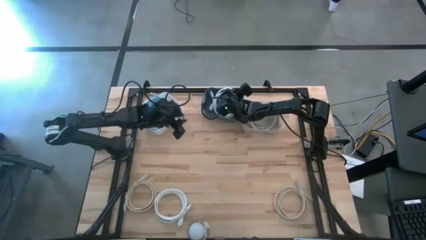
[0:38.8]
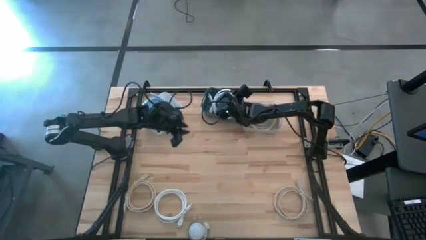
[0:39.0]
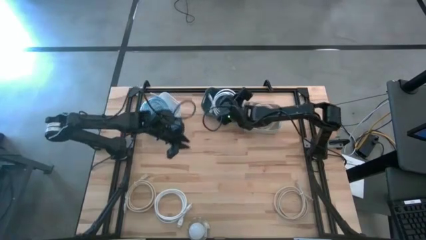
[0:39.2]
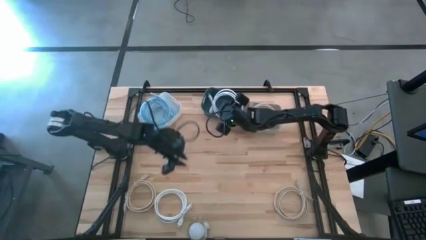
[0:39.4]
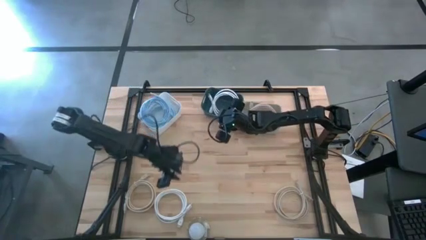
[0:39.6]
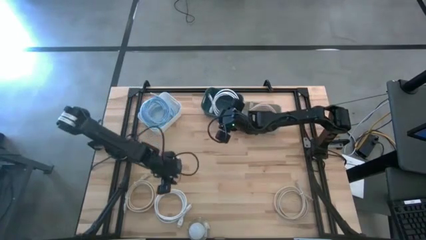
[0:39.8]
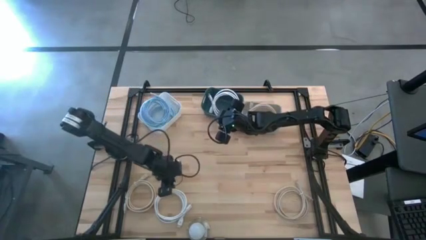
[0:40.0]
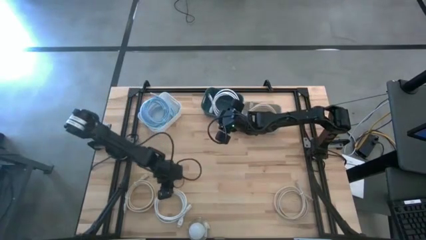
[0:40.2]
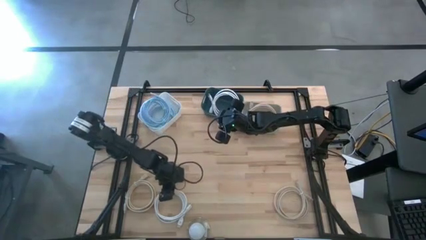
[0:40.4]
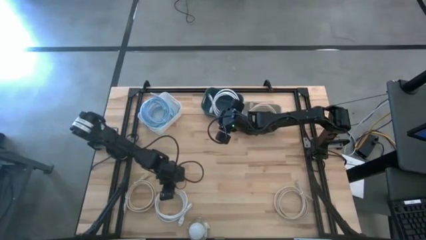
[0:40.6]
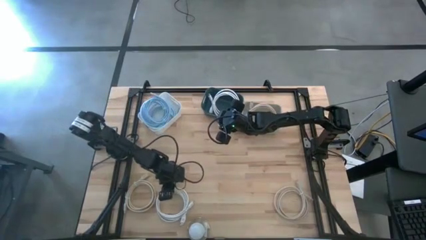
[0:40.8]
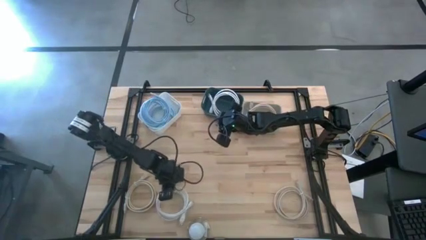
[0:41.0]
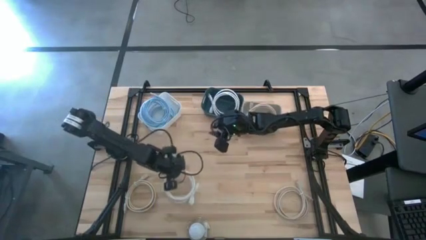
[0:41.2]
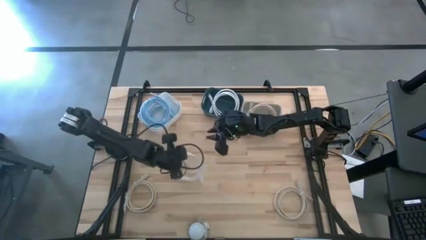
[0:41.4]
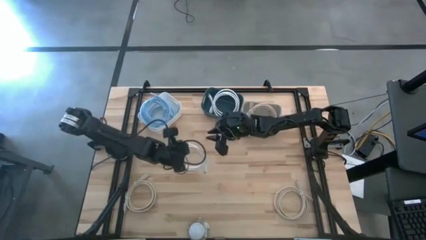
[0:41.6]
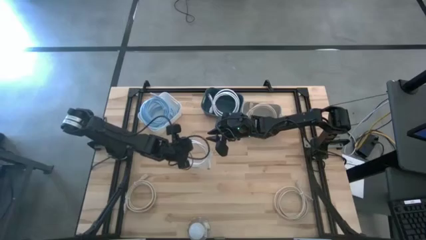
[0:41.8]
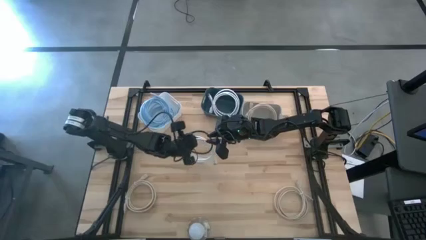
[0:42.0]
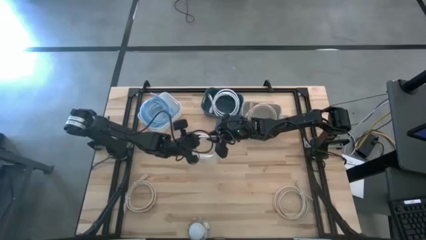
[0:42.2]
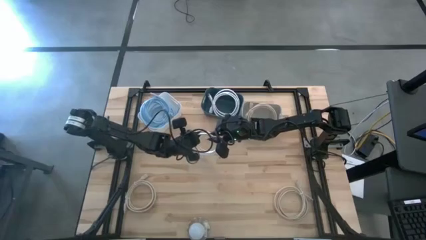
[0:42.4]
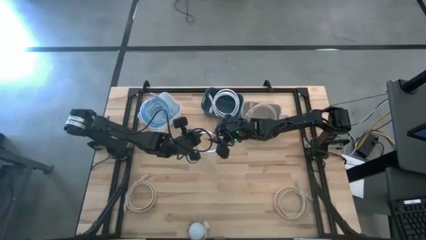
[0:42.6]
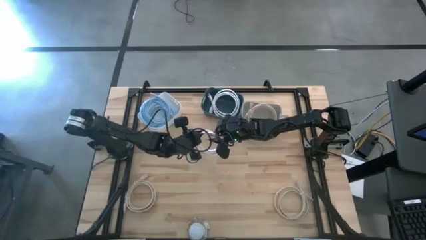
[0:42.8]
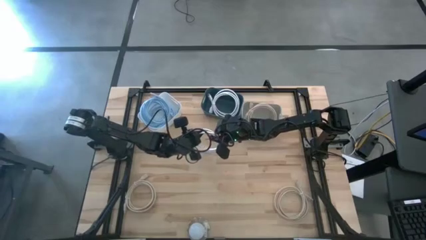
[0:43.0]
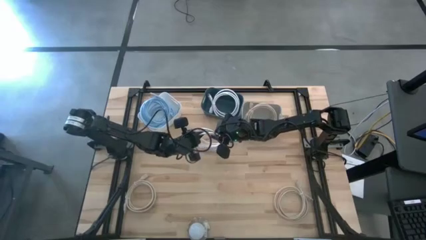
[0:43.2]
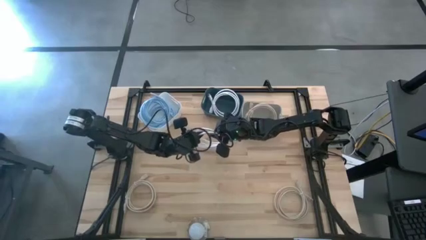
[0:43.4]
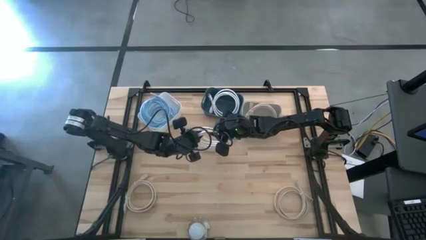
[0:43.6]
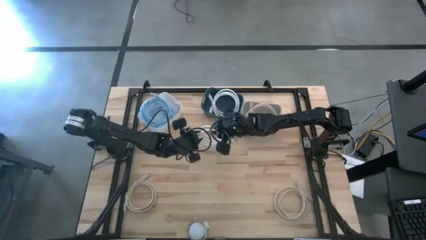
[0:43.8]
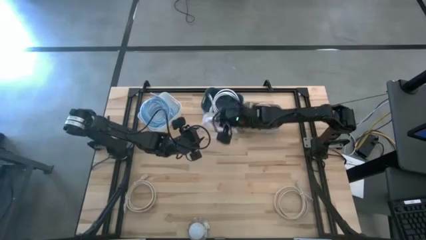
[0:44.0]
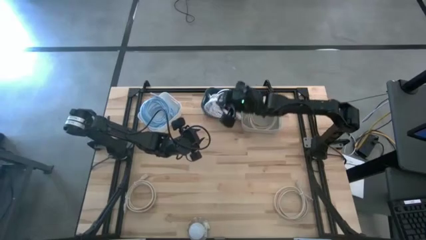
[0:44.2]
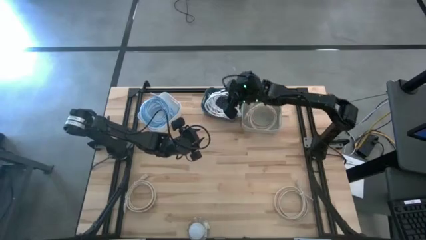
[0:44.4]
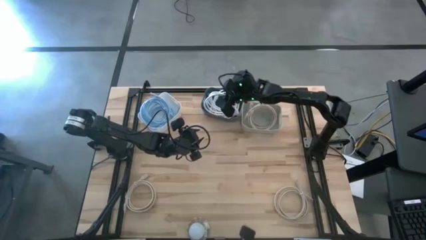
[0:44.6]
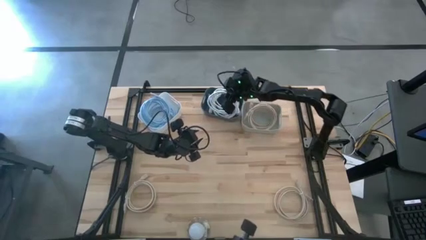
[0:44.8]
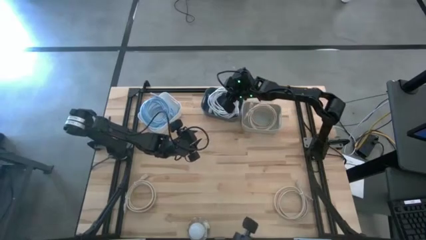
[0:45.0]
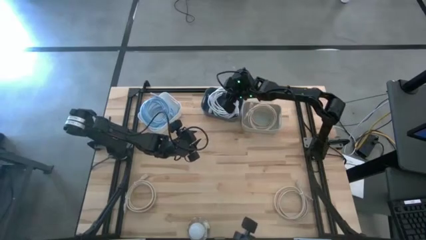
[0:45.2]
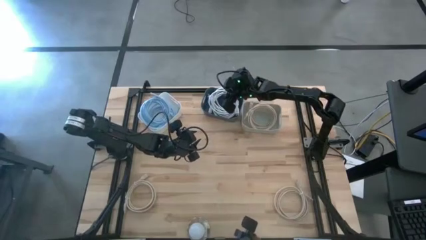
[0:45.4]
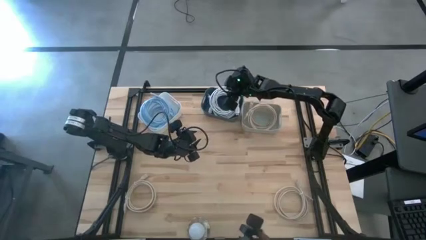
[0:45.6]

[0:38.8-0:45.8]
Task: Pick & Place USB Port
Put the white charger cable into the blue bin

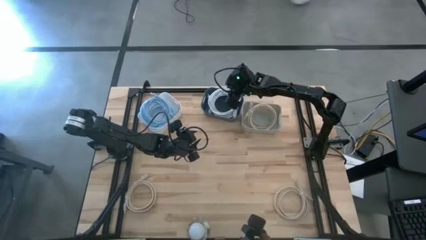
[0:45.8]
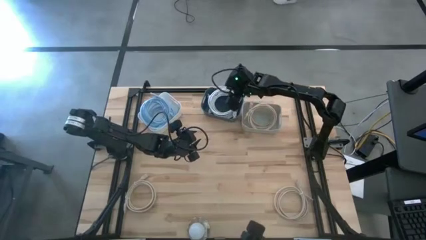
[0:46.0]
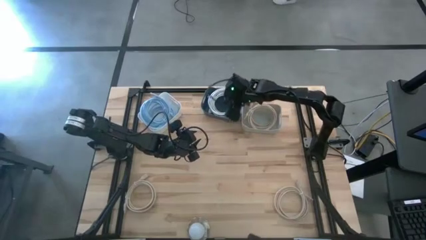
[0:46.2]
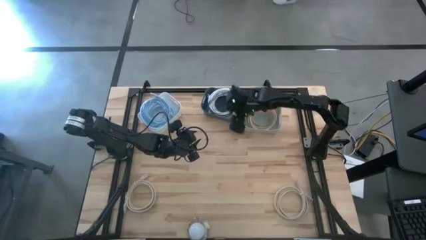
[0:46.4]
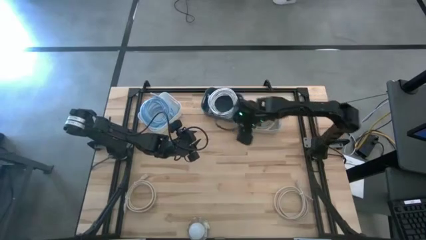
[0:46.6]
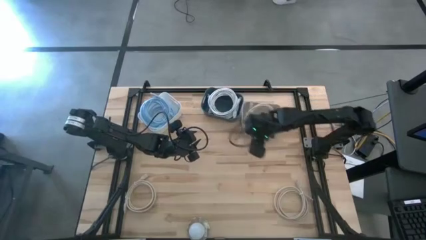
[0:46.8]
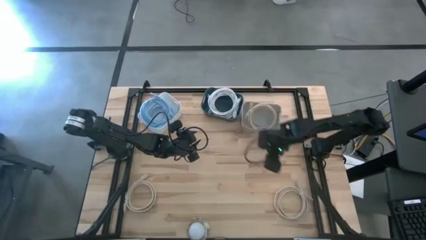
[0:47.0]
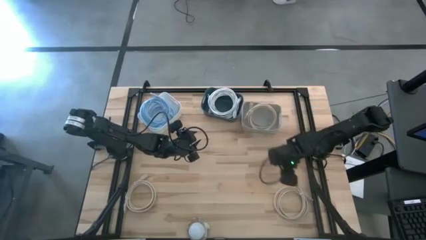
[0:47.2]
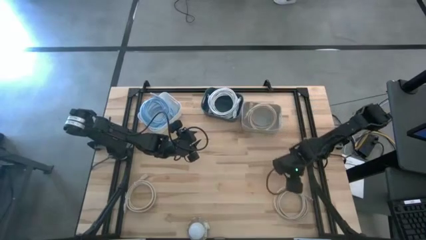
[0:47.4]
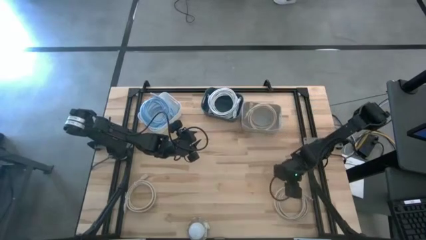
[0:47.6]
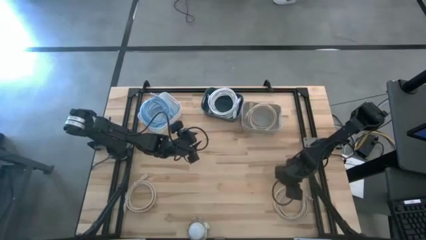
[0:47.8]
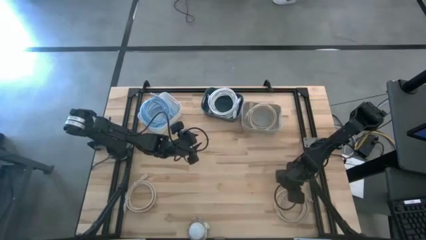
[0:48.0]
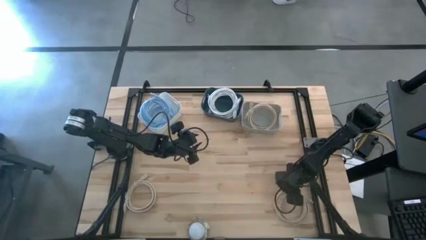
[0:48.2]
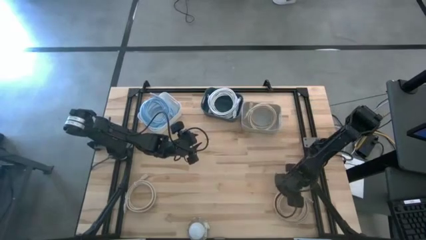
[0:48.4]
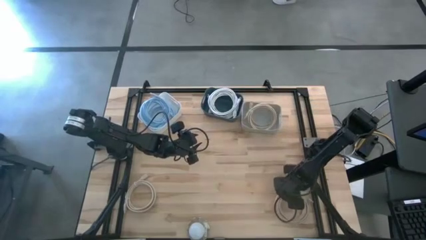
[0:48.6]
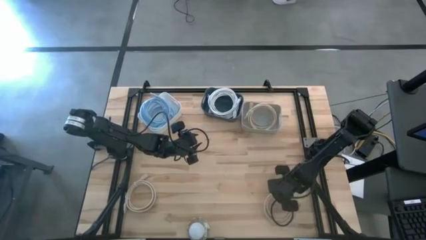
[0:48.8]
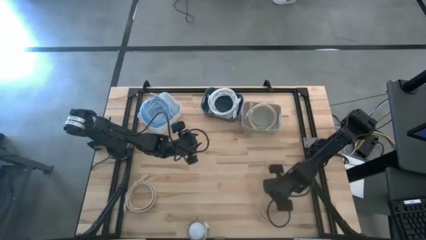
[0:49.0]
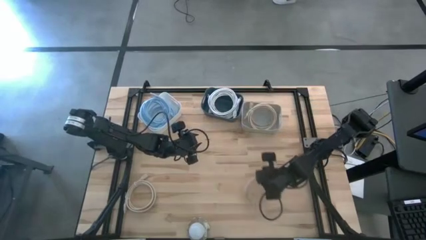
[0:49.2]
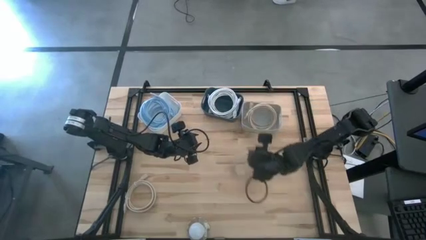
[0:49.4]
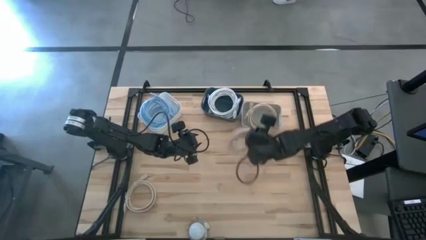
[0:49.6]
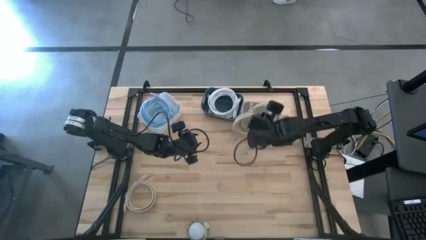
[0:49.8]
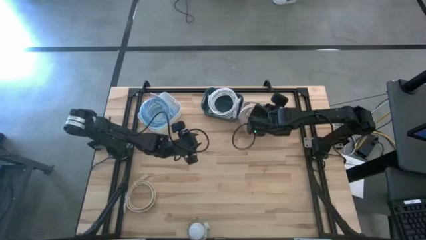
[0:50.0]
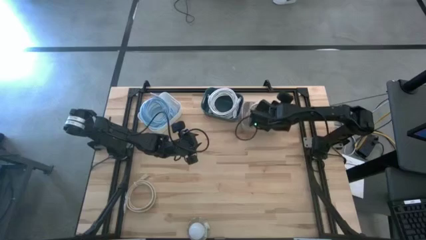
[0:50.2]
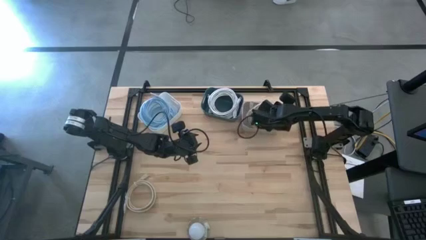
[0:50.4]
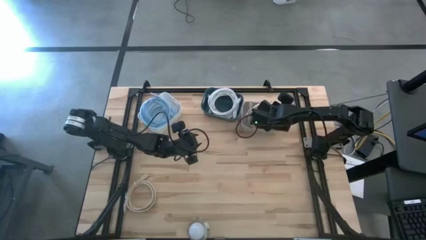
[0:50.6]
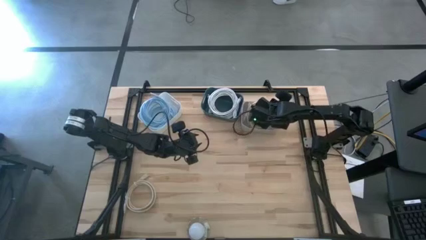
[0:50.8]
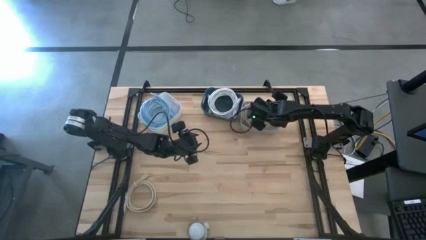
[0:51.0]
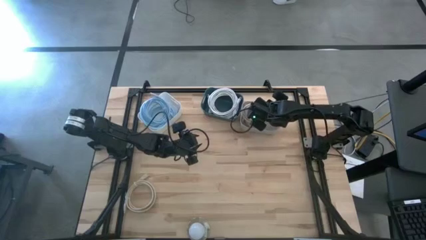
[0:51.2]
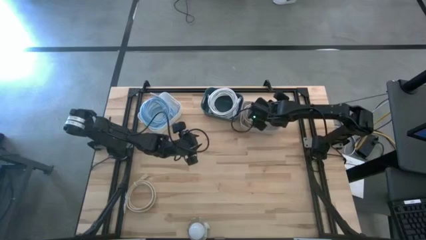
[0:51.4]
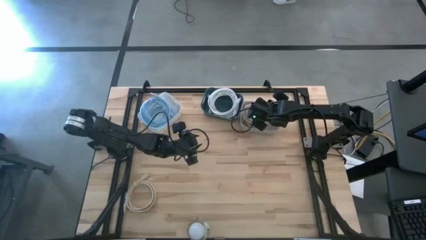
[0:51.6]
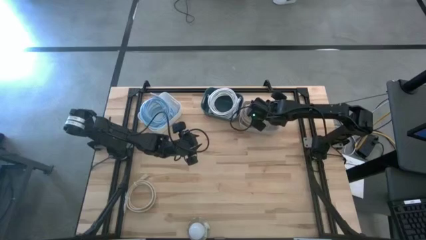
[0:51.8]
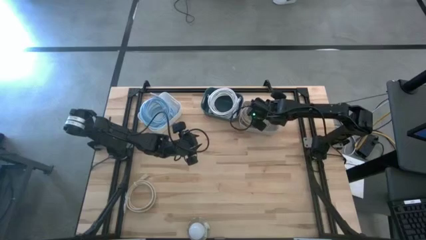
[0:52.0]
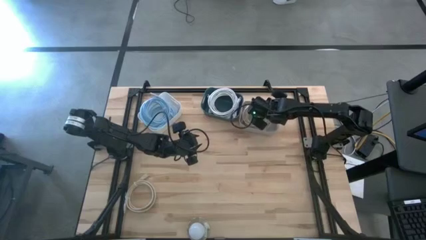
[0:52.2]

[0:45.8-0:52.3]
Put the right brown charger cable into the brown bin

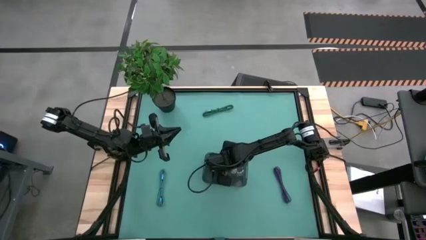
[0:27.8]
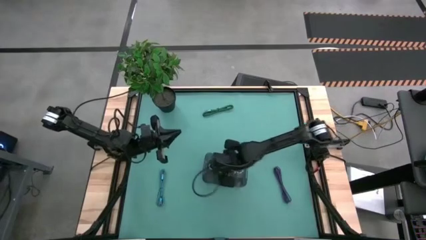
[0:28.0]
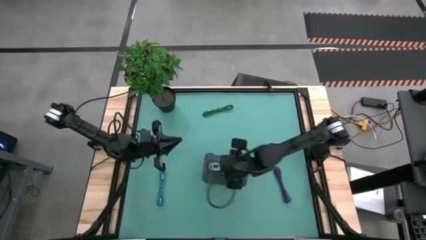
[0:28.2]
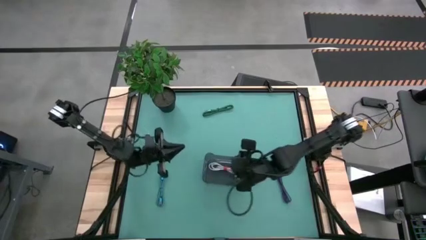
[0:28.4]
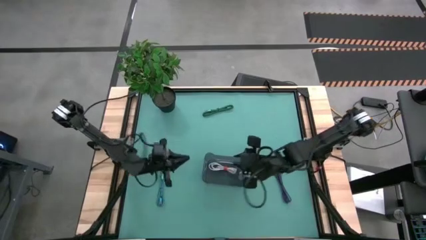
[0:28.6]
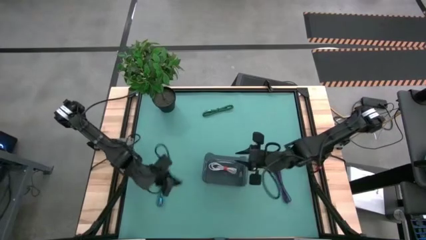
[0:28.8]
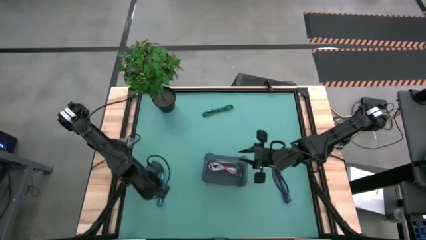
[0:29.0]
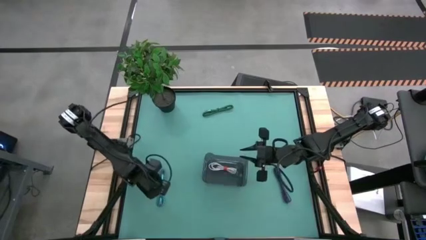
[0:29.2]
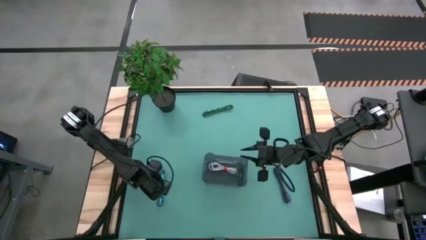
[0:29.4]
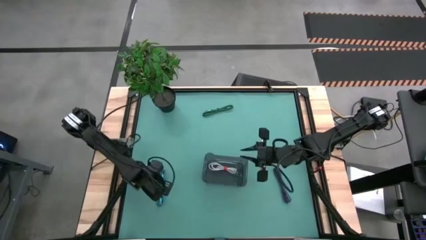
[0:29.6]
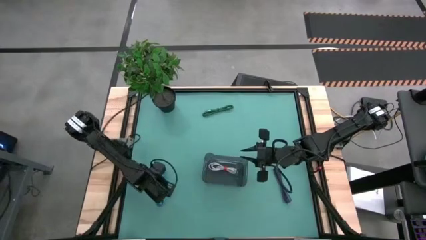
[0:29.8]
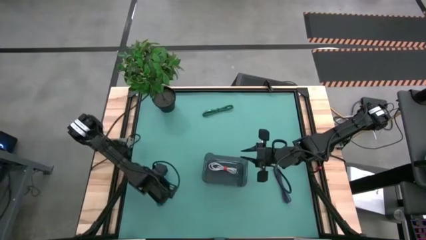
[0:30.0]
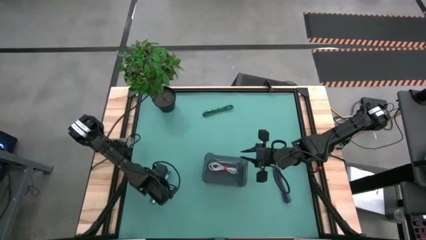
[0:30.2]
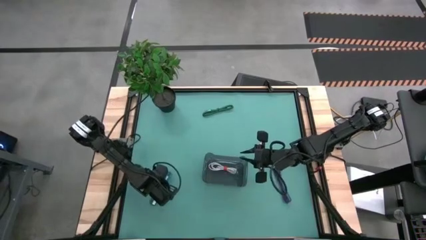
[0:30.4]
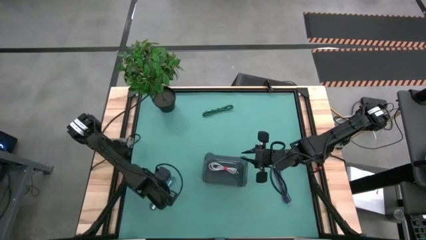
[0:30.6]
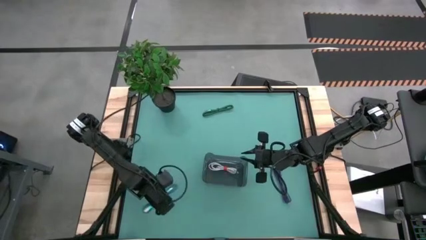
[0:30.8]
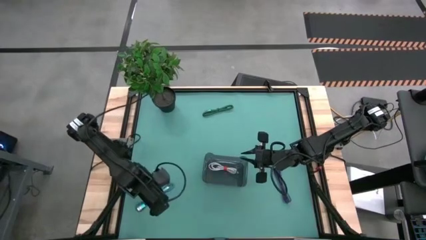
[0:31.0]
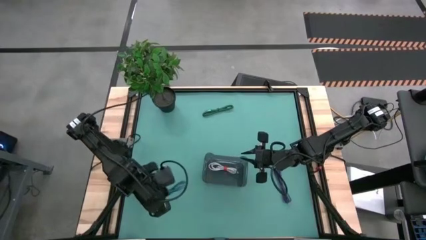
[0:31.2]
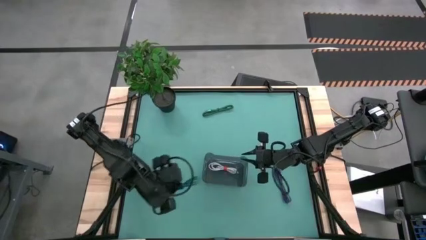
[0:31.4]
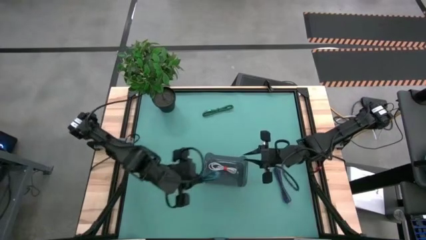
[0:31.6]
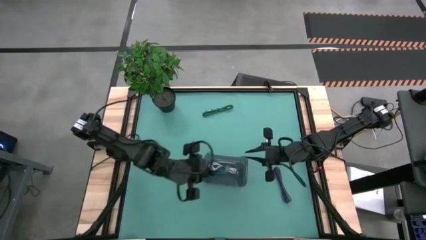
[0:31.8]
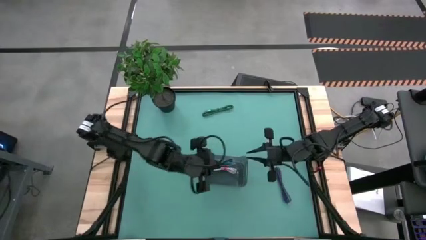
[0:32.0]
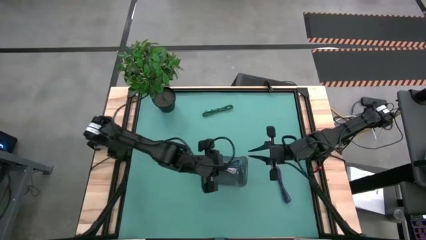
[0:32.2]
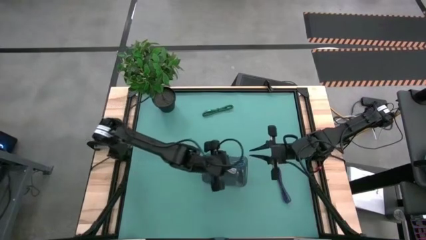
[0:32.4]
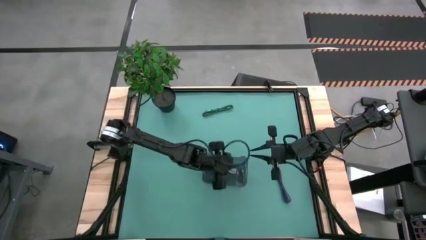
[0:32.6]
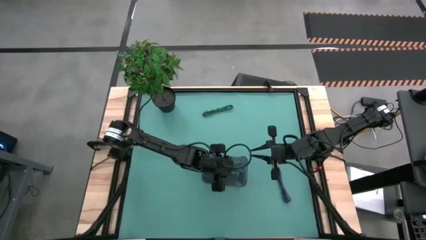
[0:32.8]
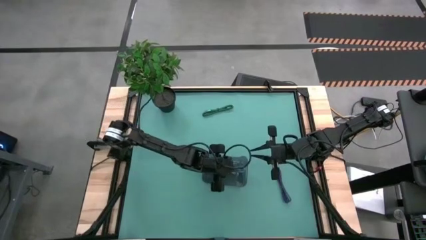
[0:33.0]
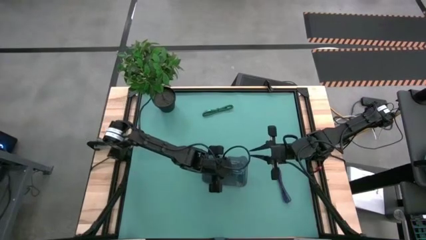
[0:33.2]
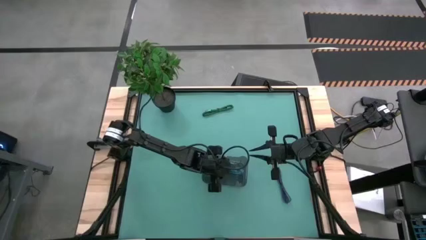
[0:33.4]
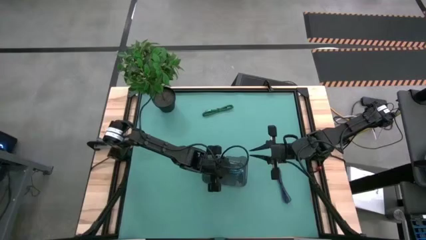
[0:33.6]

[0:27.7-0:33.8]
Task: Pick and place USB-C Cables
Put the black blue charger cable into the black bin
